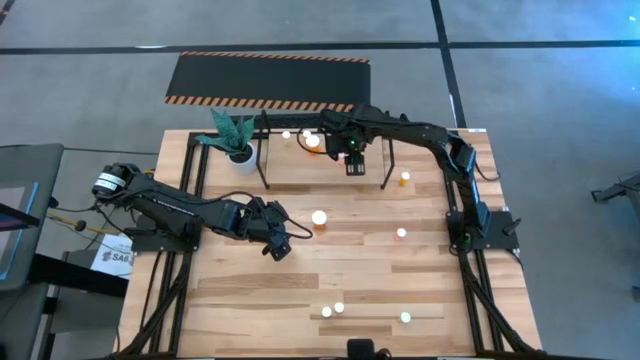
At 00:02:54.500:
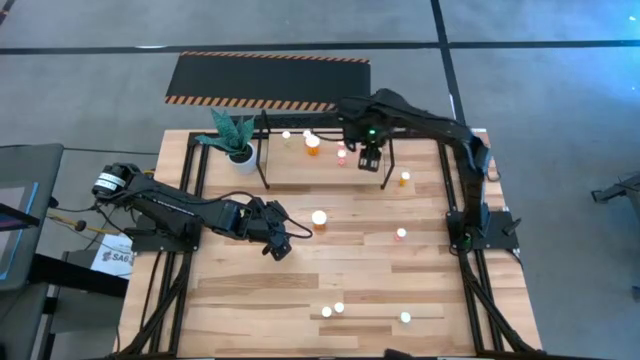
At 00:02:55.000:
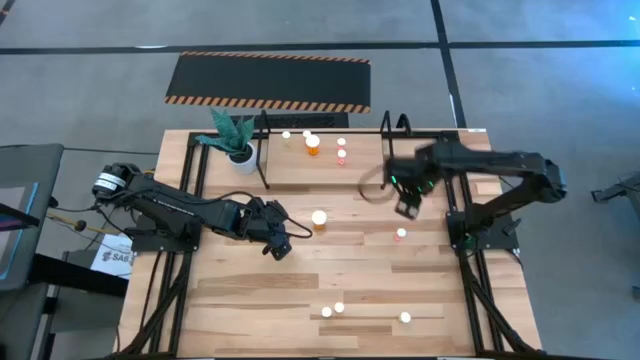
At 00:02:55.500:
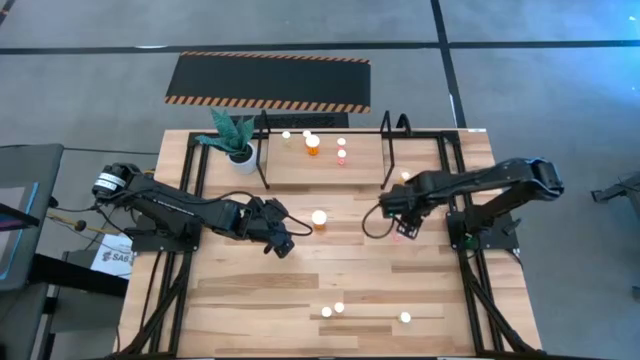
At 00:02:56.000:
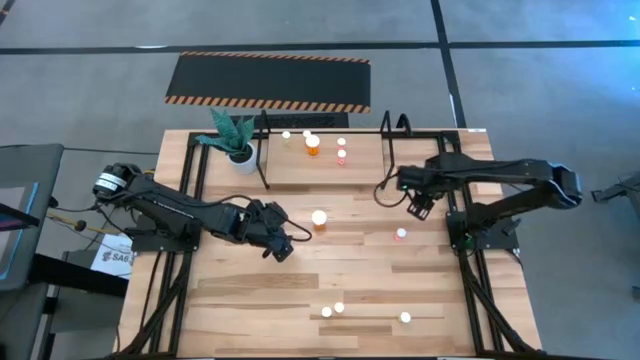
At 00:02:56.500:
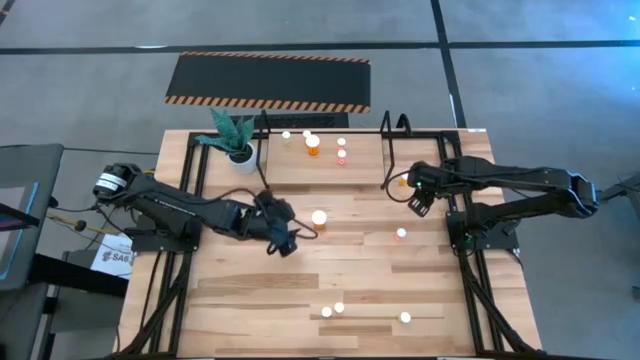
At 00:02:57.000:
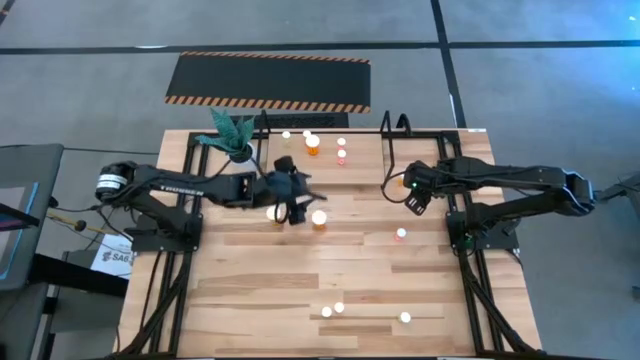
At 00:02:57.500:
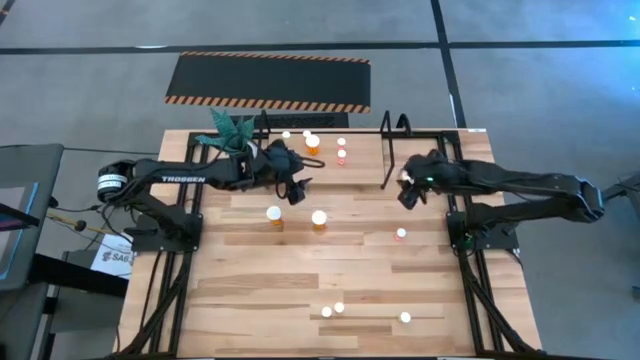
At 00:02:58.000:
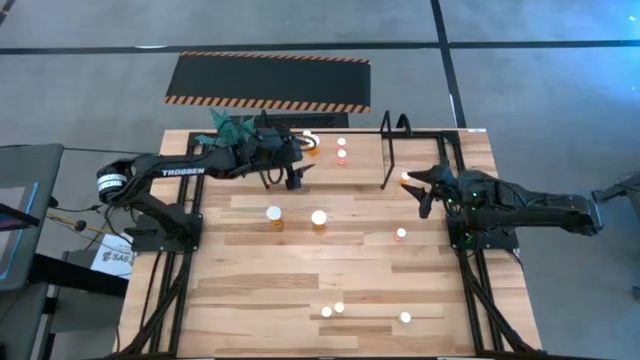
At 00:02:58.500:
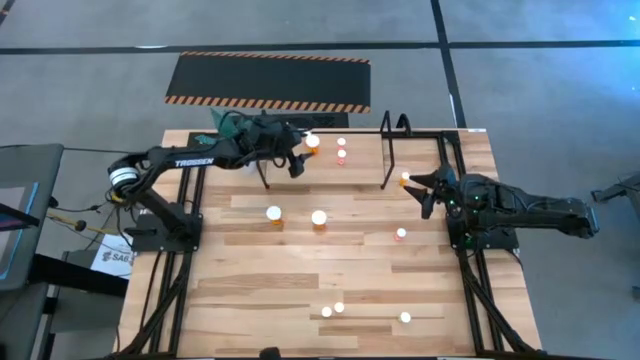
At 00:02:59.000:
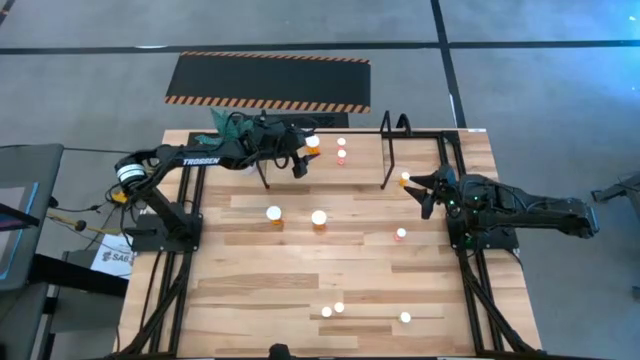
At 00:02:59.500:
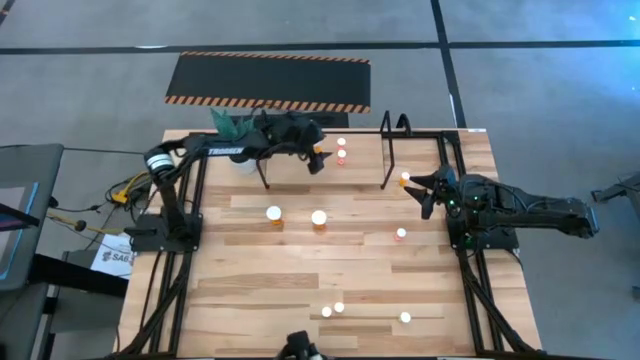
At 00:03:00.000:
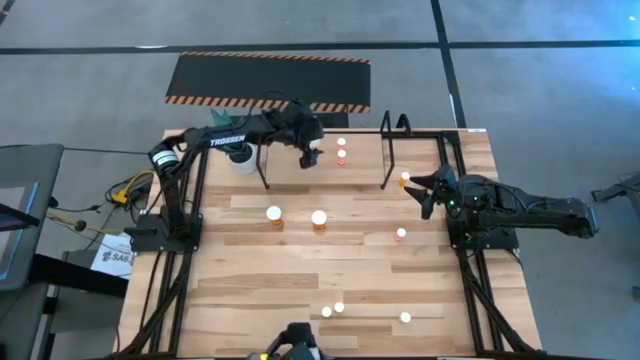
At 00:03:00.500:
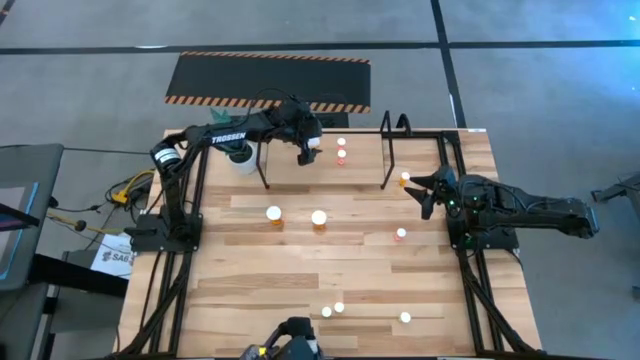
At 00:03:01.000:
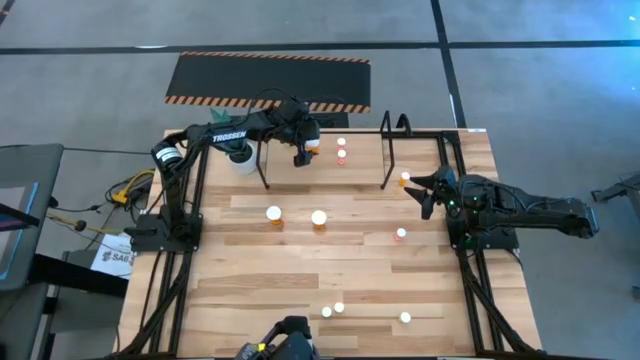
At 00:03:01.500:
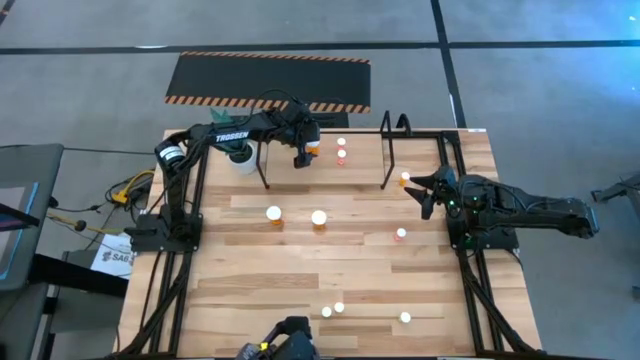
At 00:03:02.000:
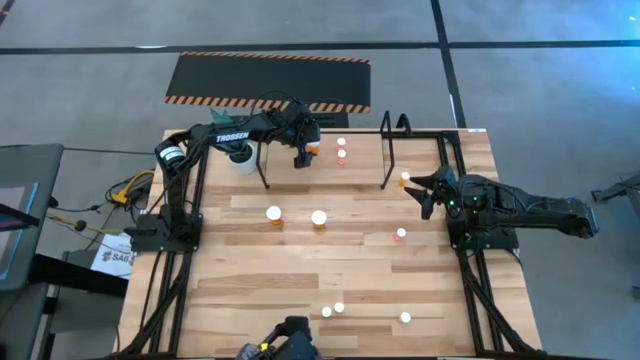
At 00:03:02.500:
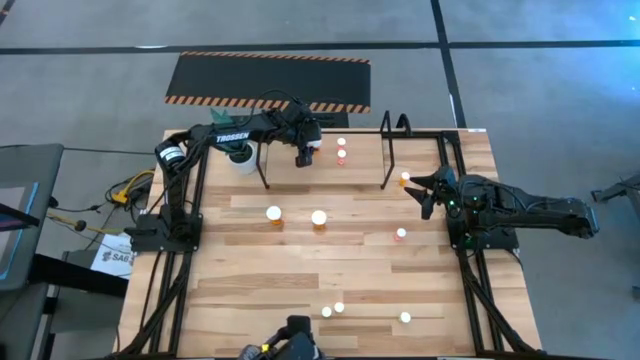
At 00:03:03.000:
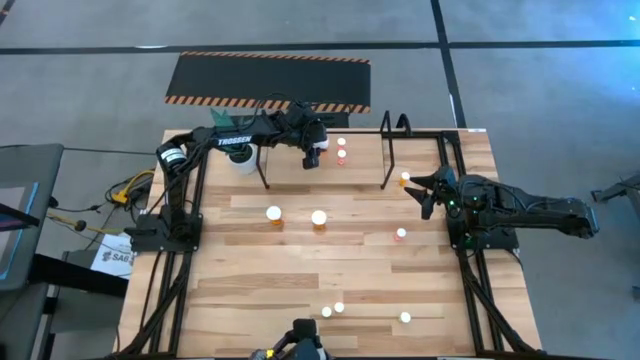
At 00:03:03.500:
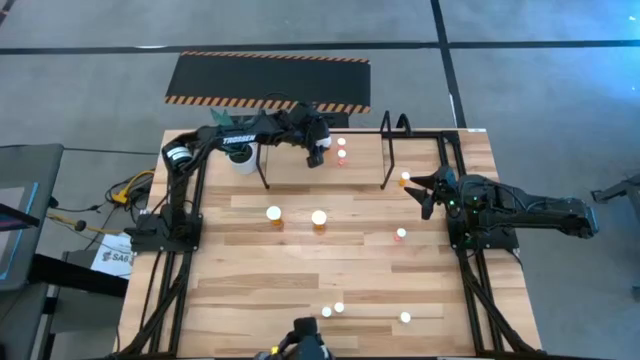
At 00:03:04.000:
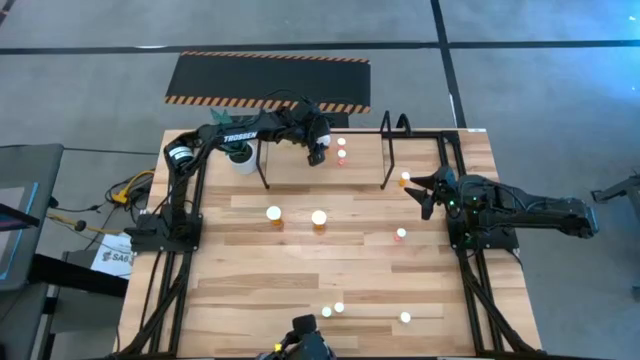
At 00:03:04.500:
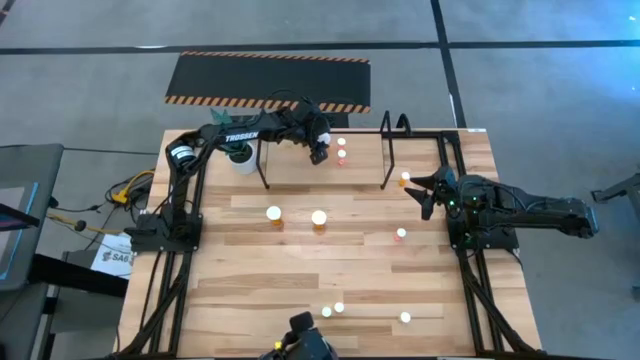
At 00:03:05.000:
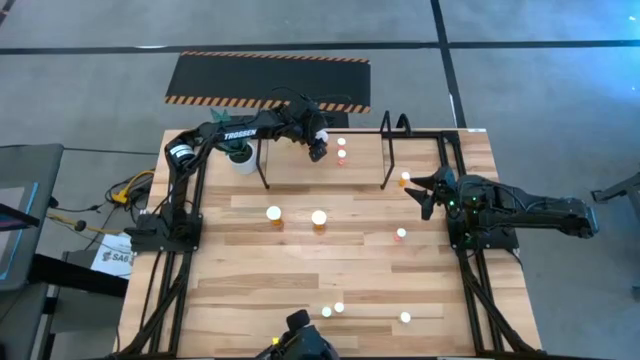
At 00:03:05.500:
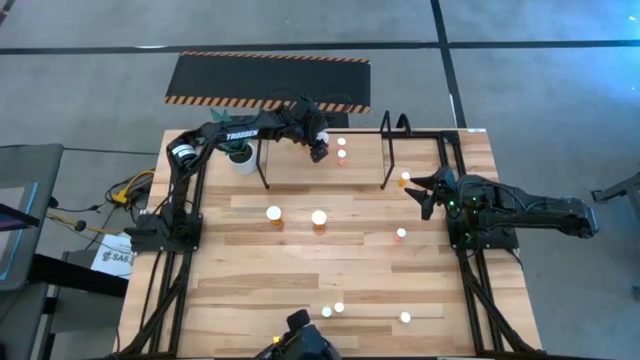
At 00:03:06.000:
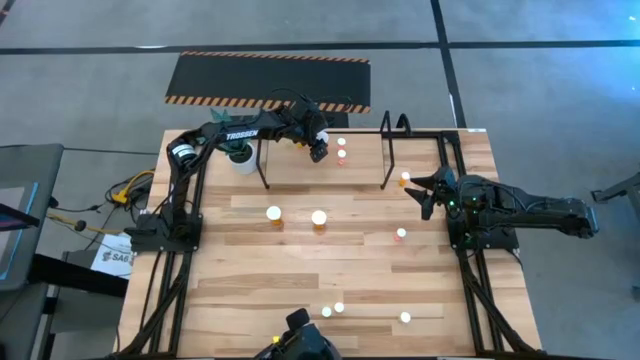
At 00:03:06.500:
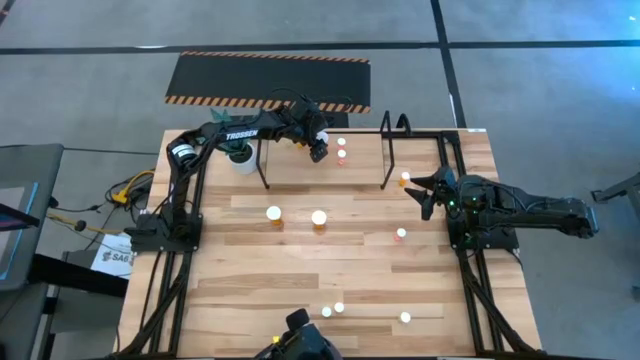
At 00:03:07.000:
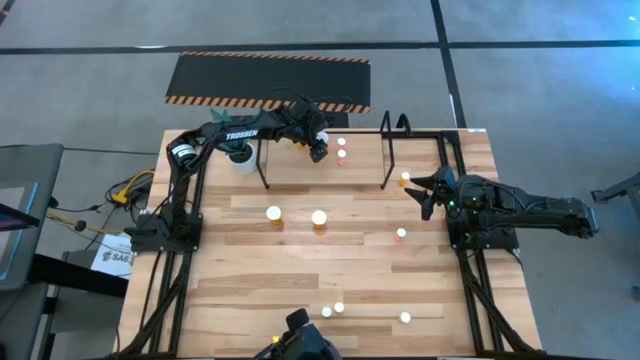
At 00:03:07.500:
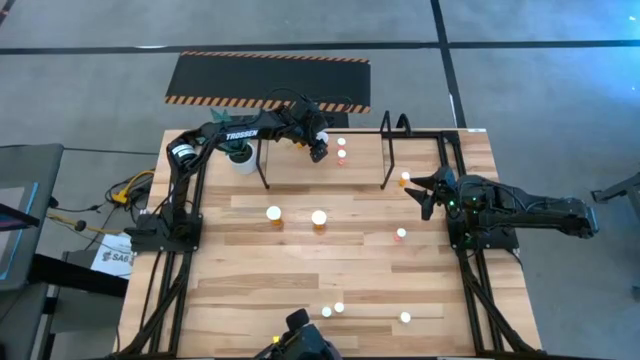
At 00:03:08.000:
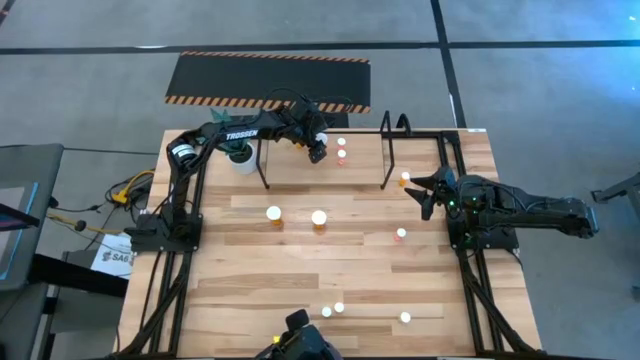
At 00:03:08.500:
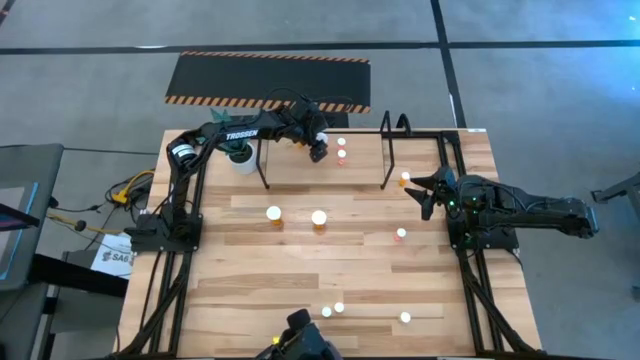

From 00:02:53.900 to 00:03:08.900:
Task: Pick and place medicine bottles onto shelf by color
Adjust the big orange pill bottle on the shelf

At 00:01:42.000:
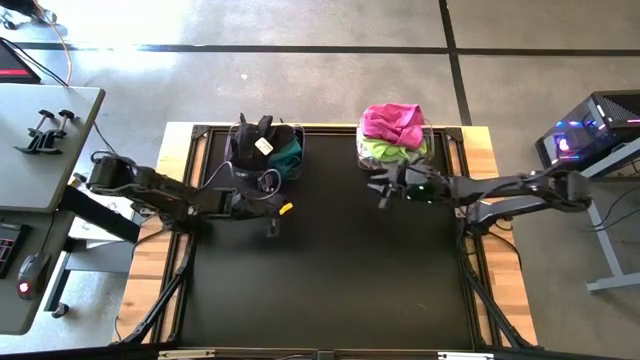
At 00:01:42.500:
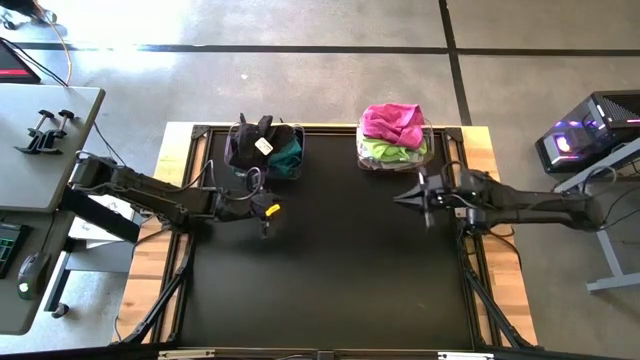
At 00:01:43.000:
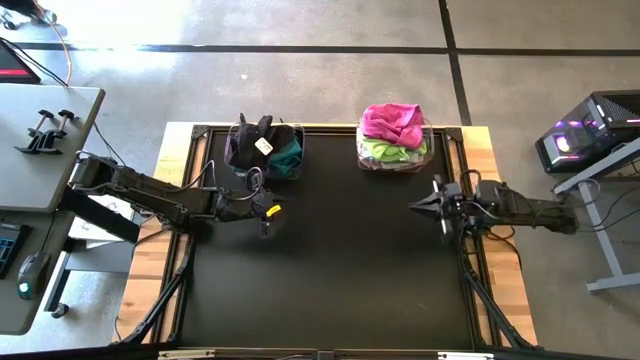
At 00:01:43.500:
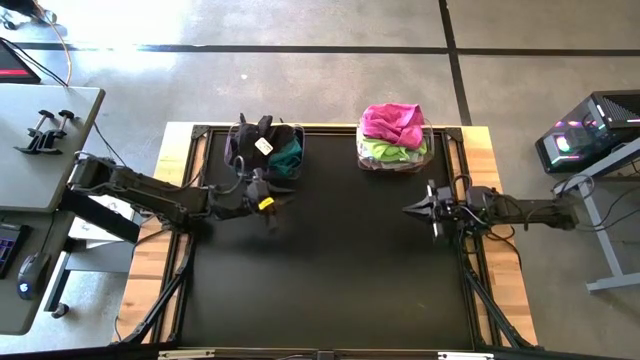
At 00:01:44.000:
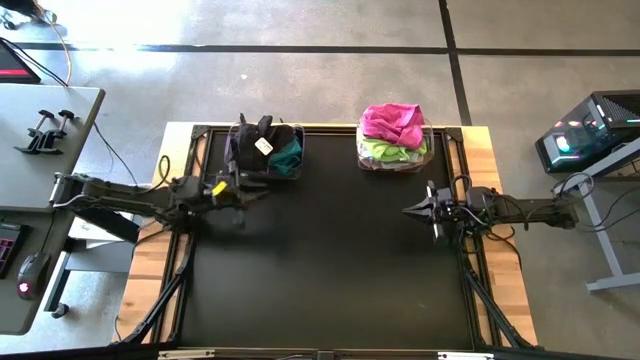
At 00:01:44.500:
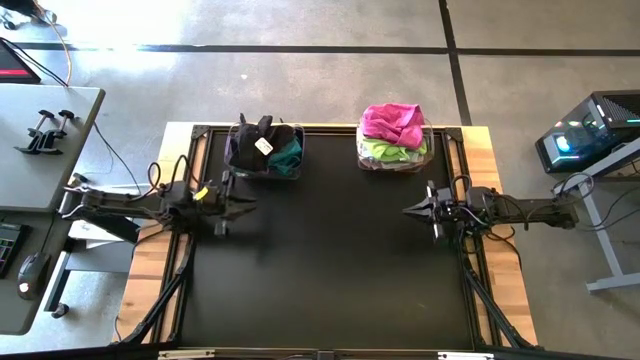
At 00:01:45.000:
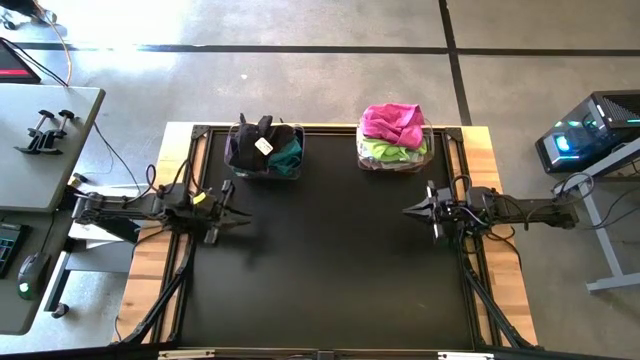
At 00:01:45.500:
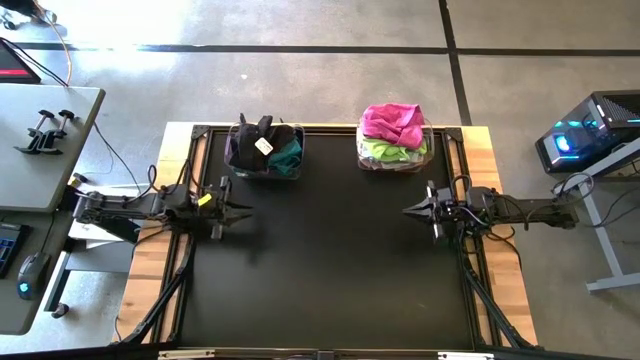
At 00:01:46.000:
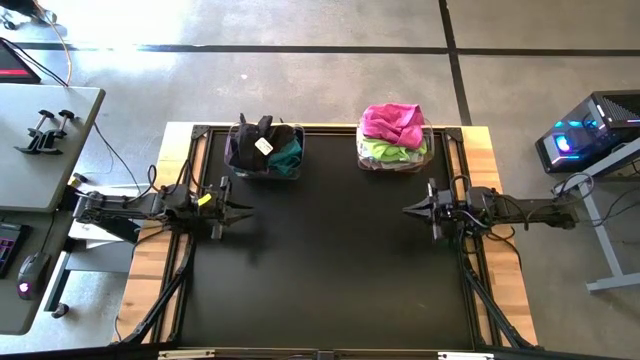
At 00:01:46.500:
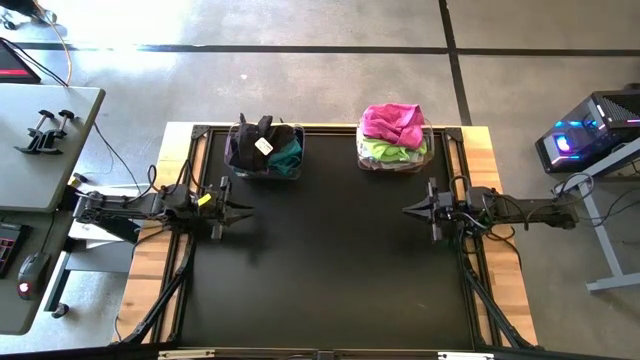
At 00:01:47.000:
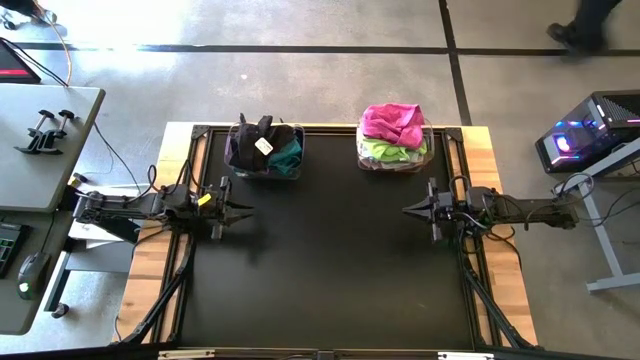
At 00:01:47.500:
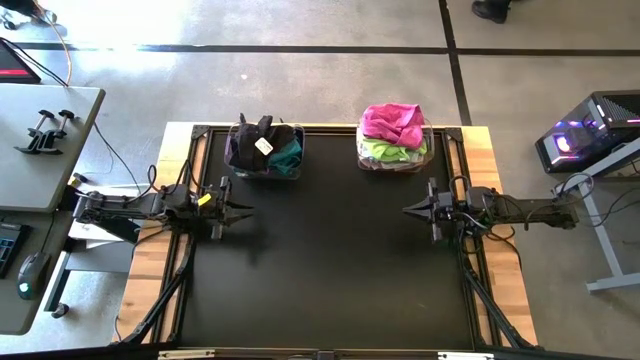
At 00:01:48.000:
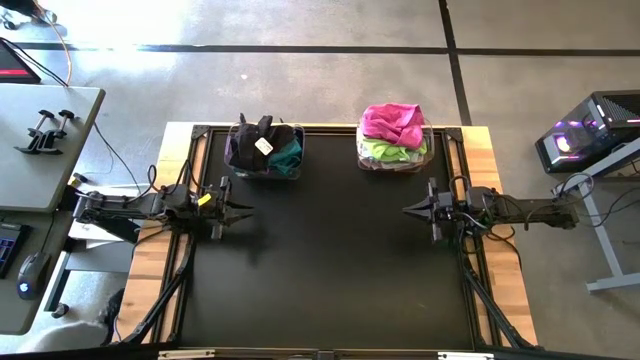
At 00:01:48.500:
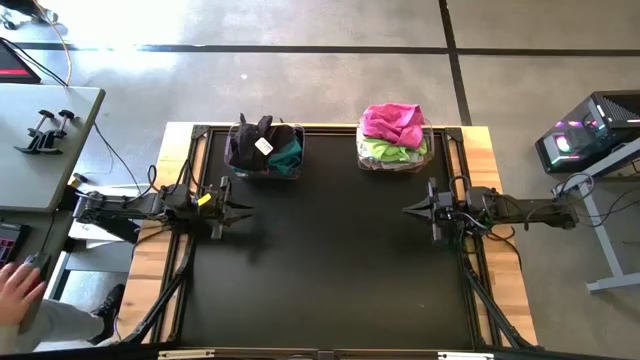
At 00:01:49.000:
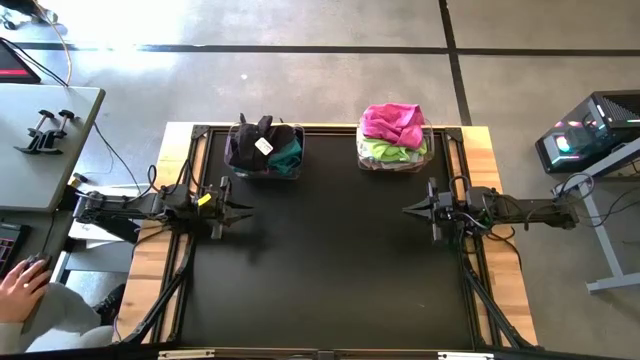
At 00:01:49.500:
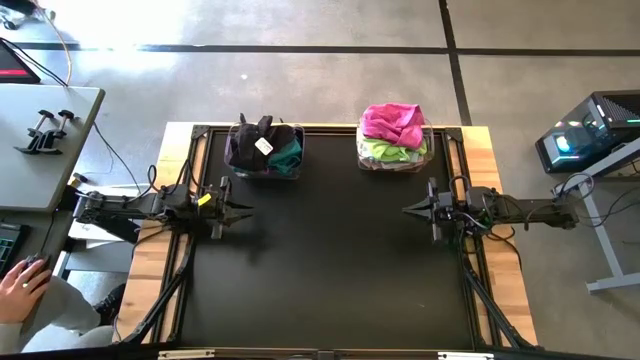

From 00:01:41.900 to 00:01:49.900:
Task: Sort towels by color in basket
Return to Home Position
